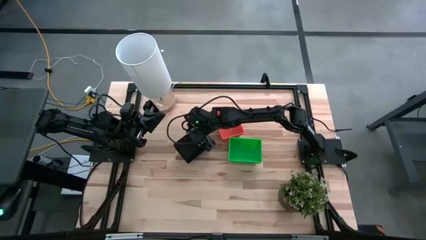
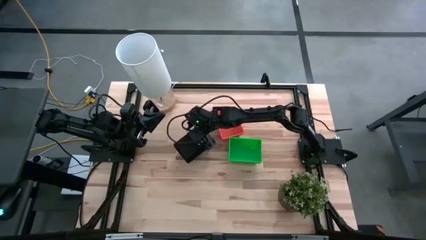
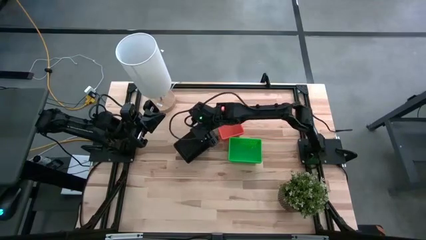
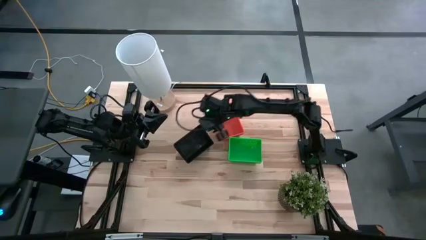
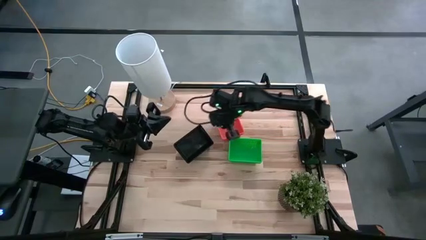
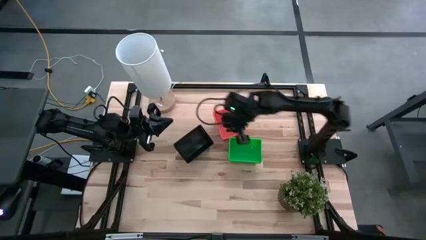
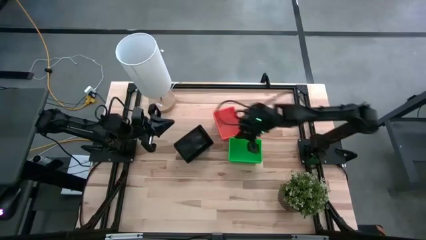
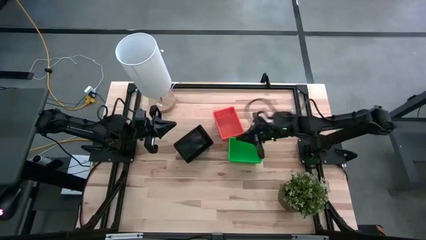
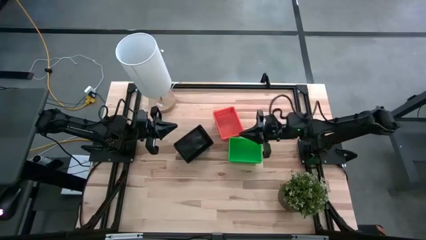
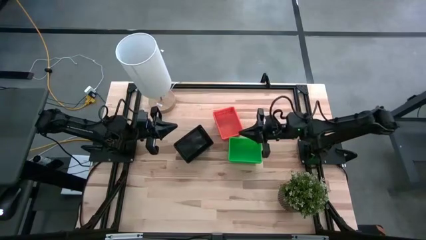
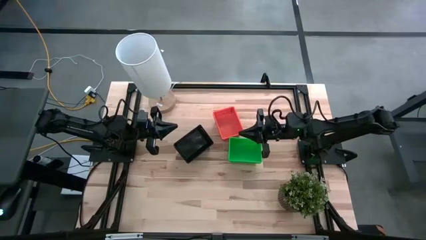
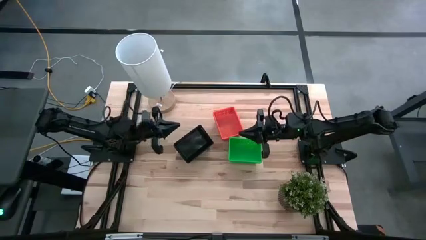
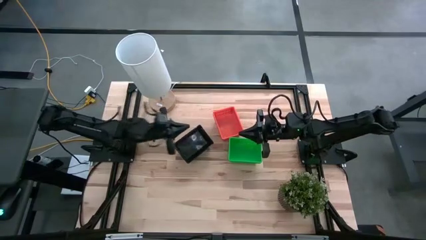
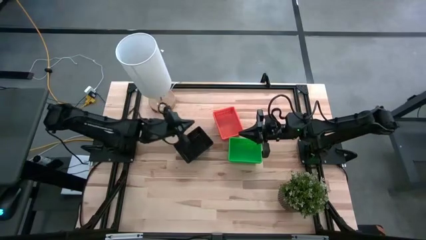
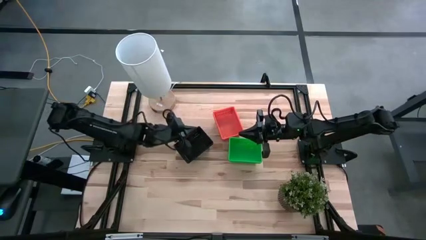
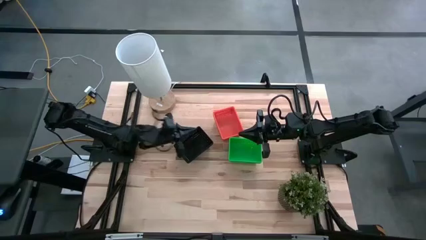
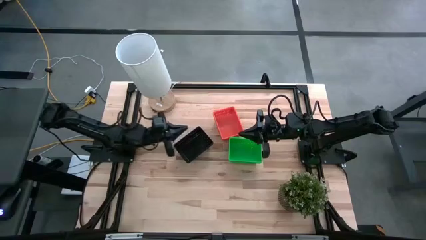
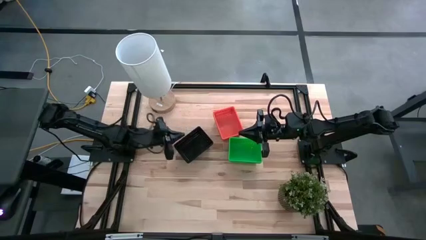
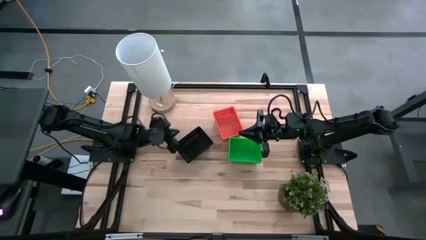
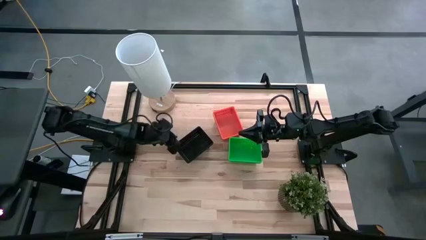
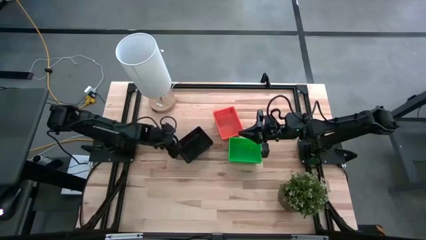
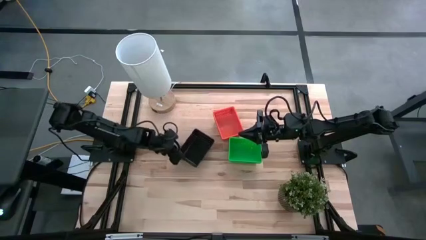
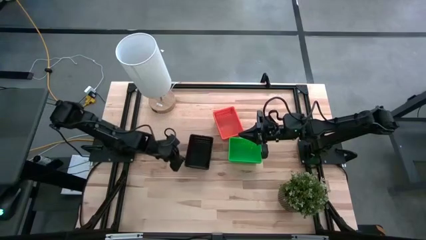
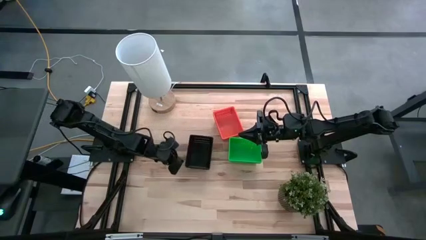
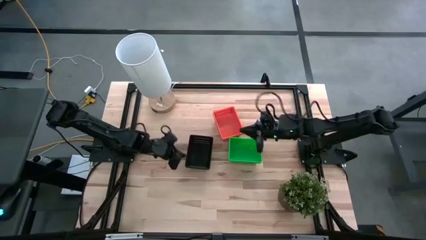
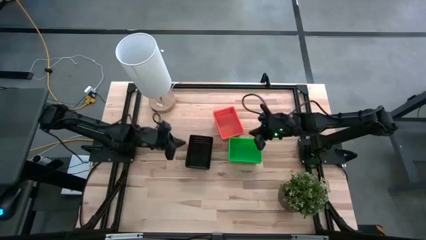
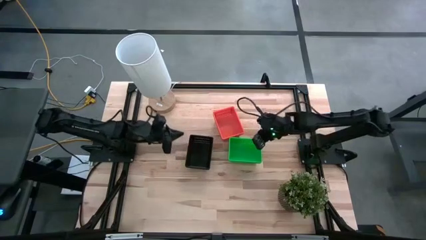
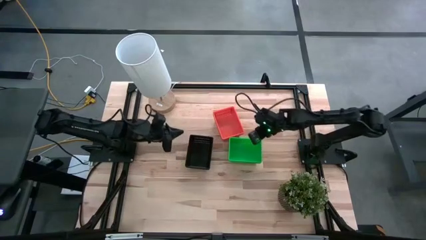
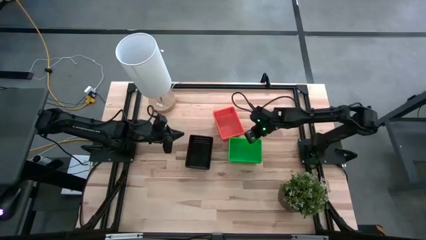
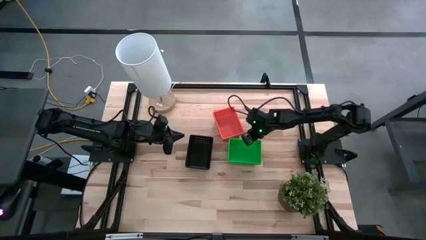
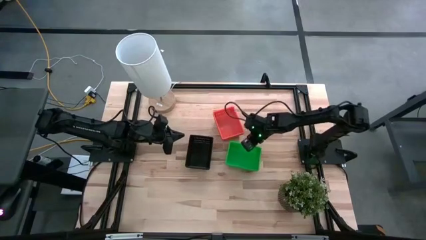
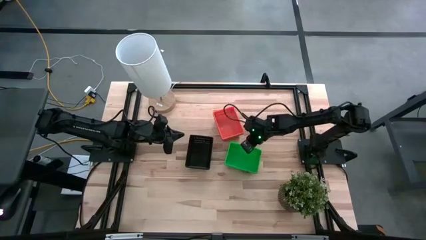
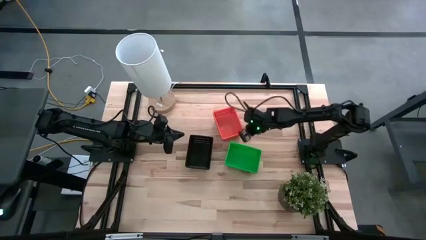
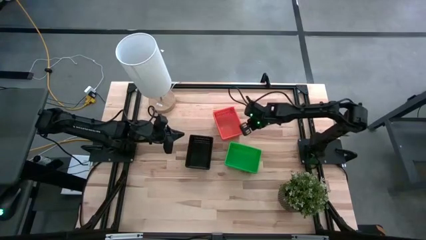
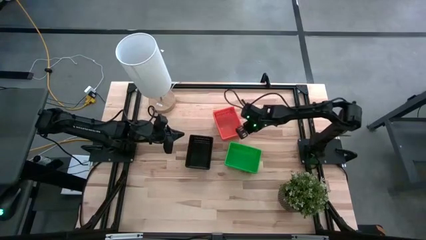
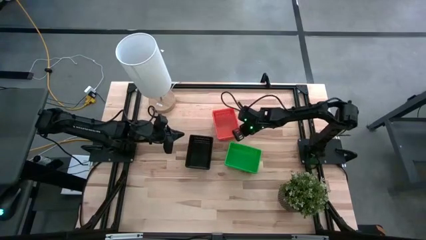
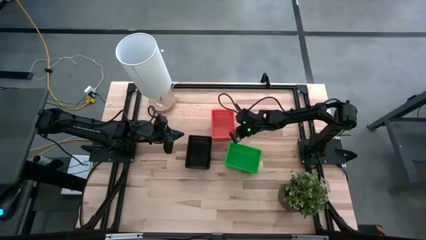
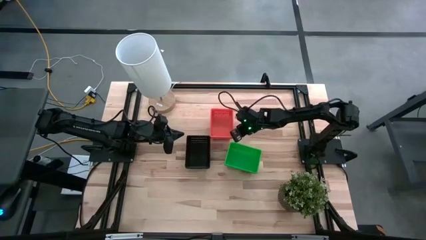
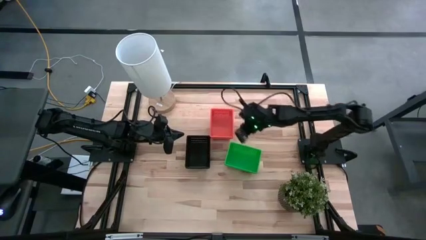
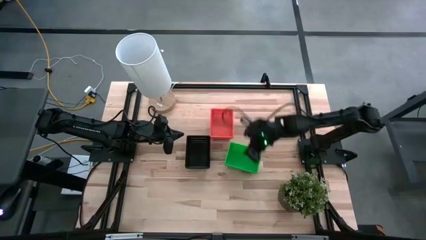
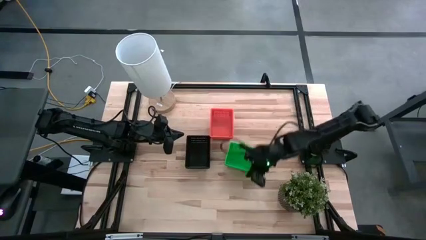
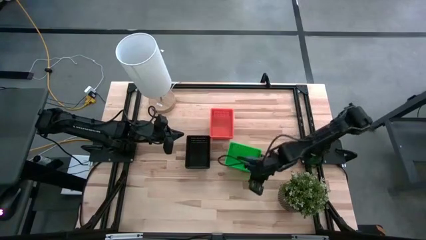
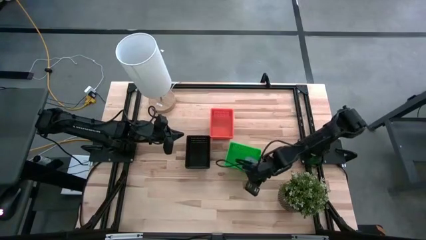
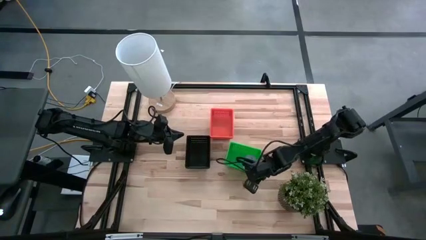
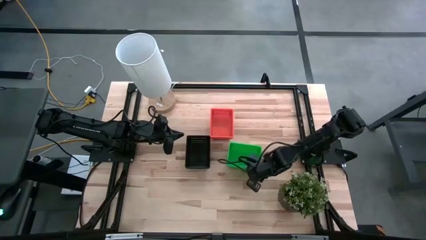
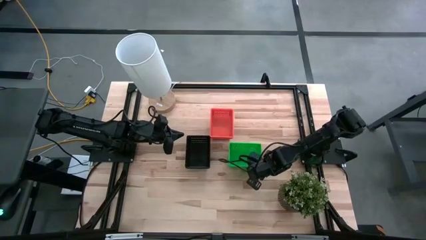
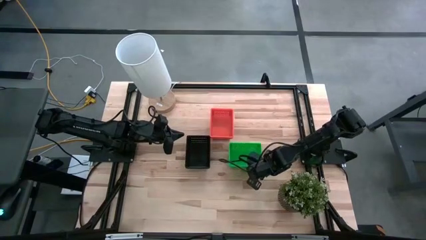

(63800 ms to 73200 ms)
Adjust the stacked bins

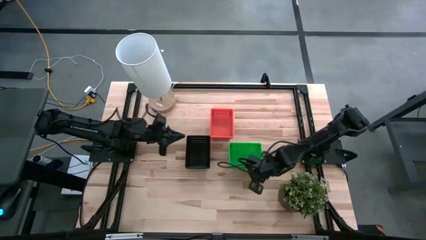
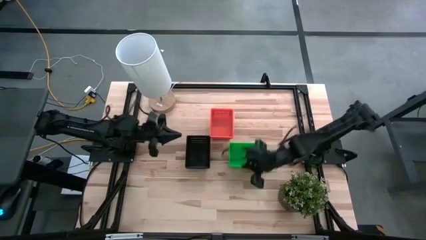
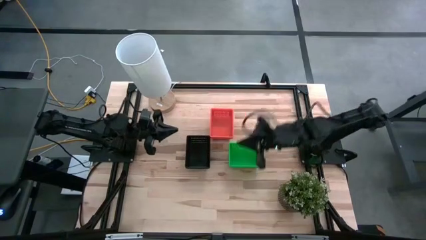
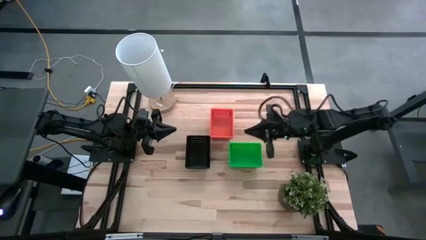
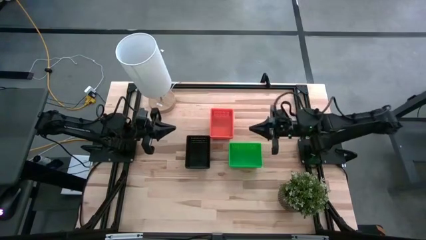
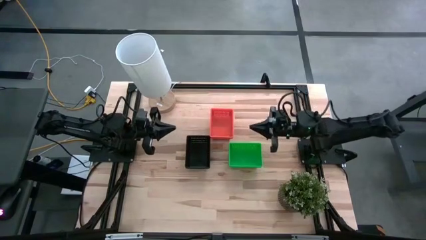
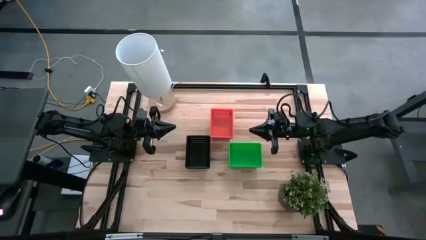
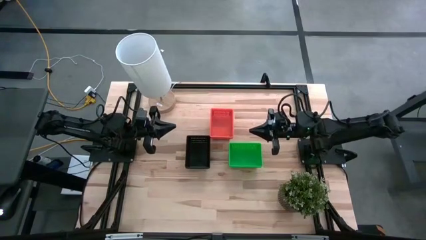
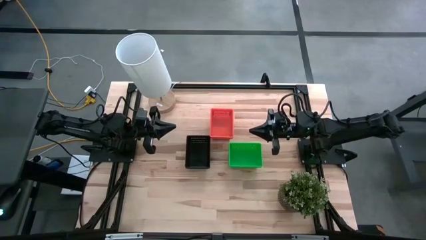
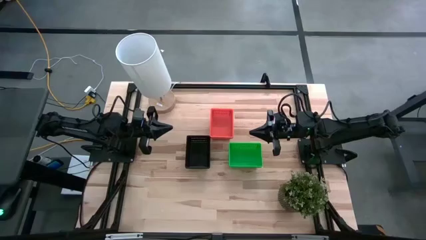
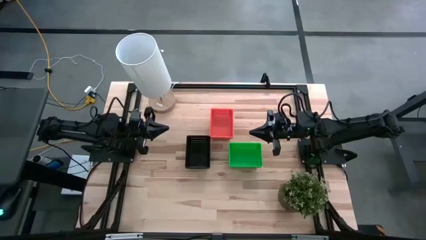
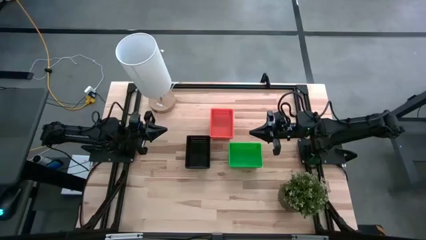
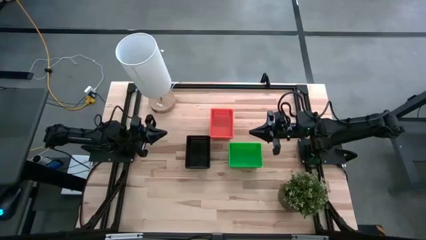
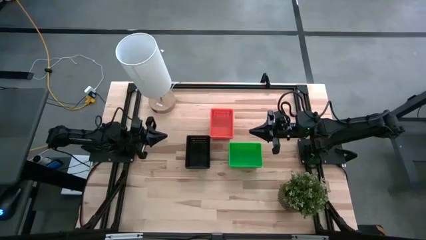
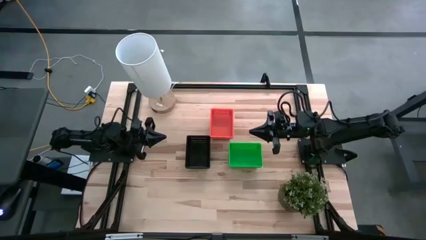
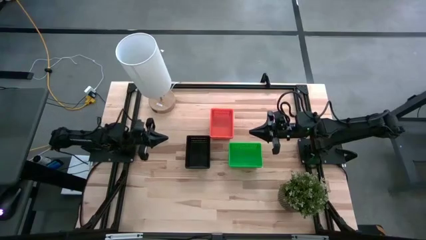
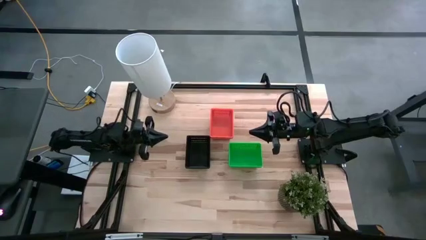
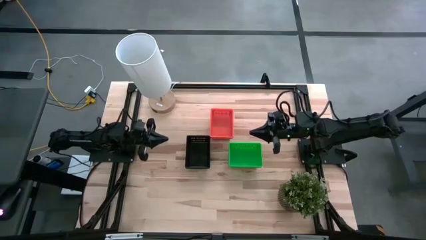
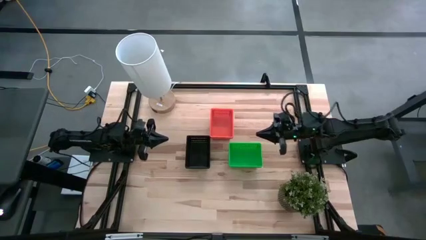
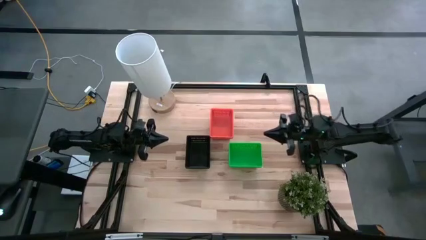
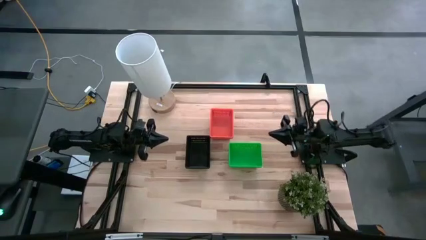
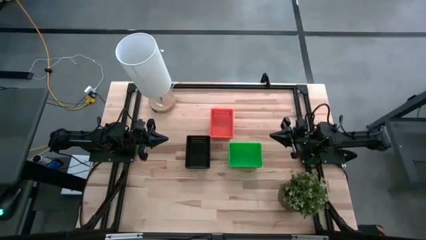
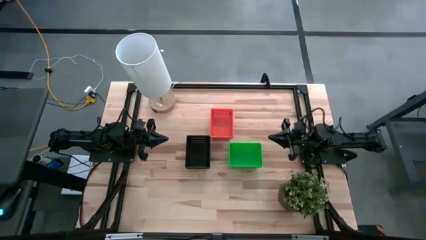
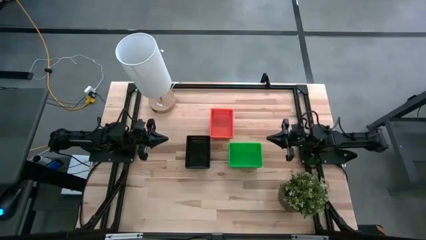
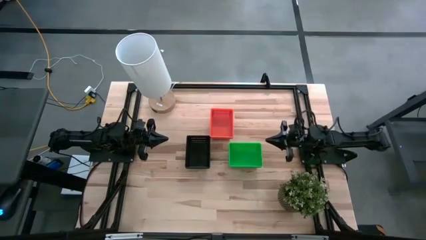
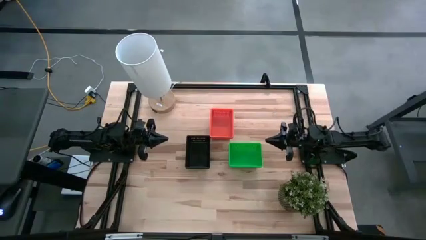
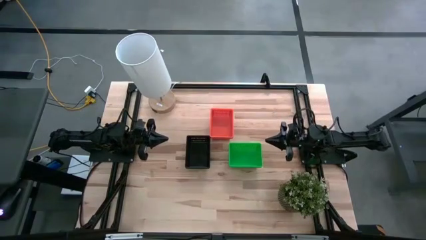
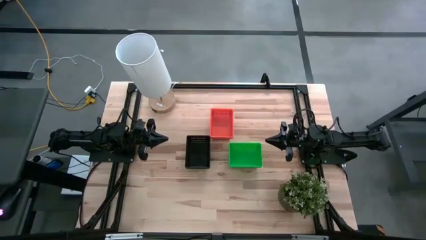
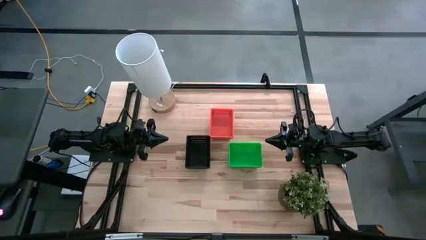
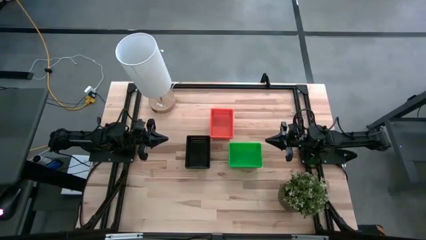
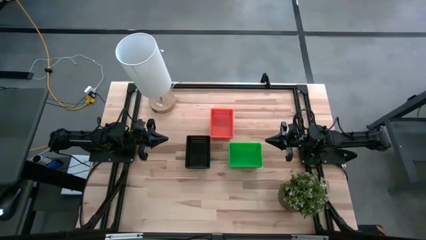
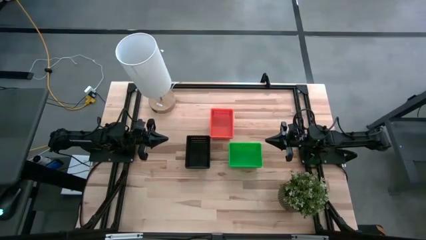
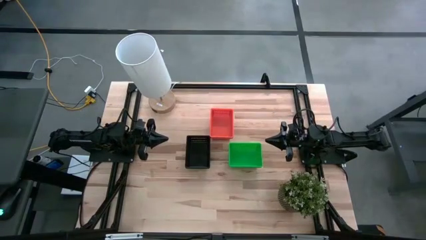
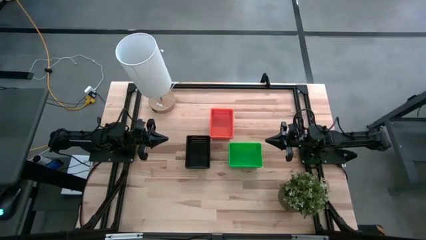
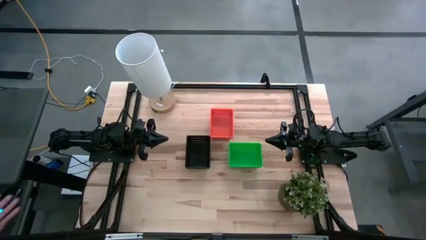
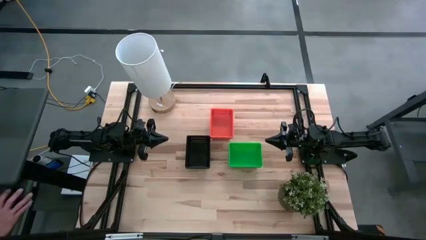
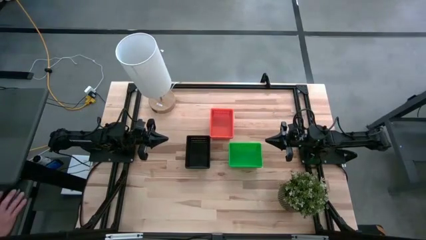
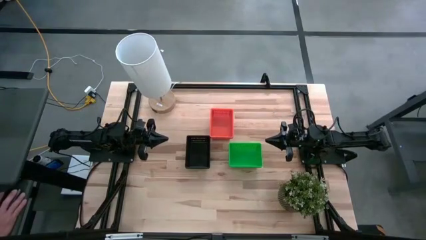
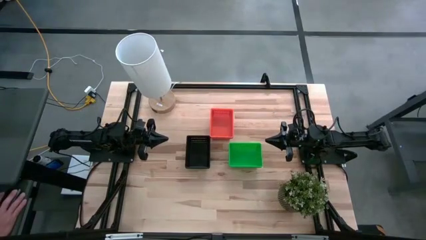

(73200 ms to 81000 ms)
Return to Home Position
